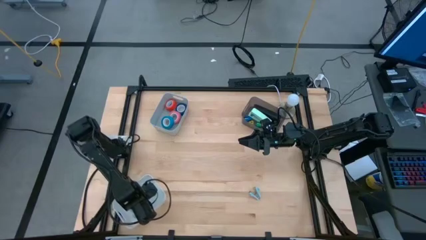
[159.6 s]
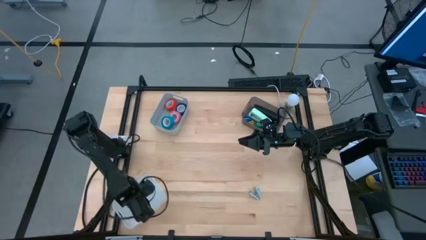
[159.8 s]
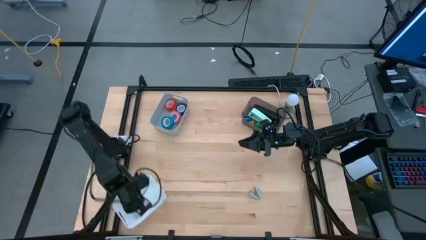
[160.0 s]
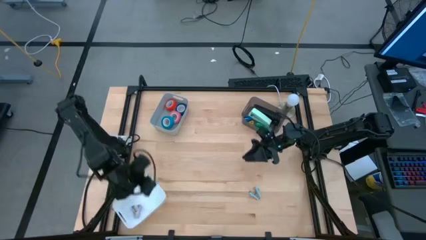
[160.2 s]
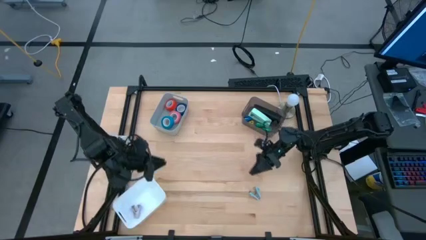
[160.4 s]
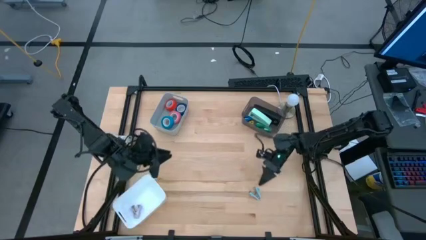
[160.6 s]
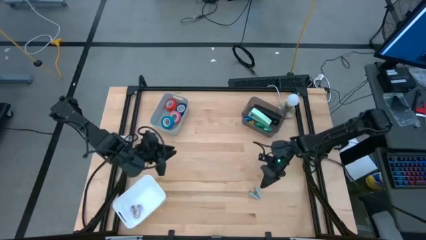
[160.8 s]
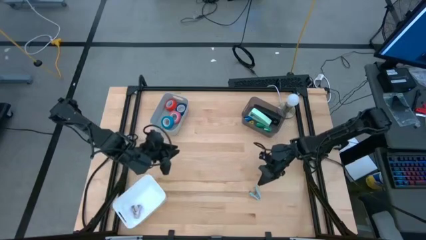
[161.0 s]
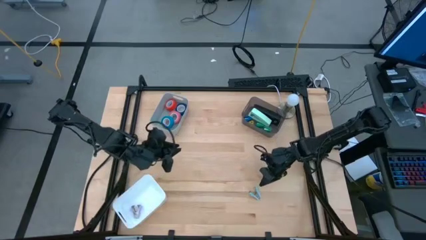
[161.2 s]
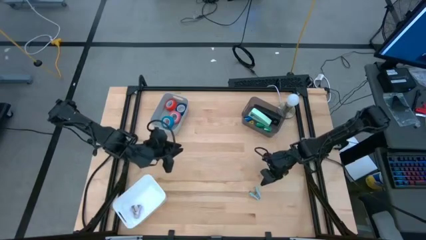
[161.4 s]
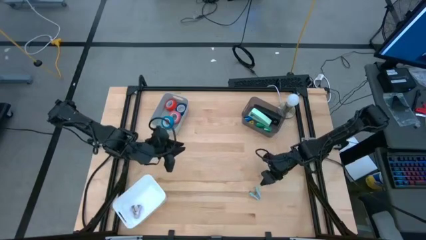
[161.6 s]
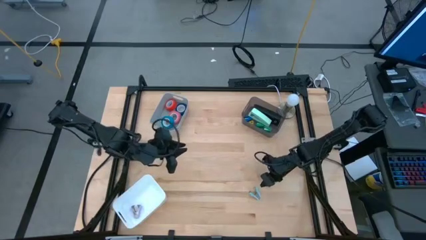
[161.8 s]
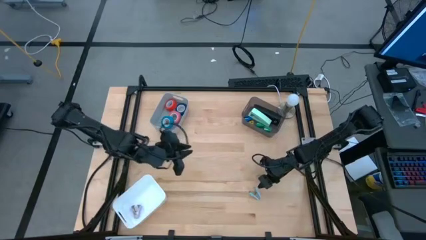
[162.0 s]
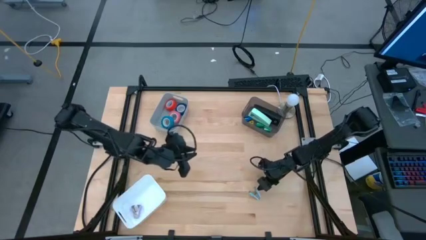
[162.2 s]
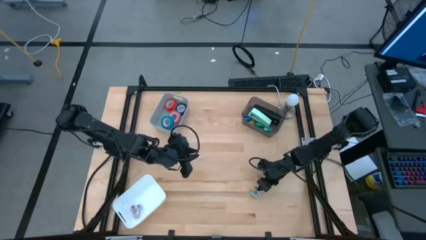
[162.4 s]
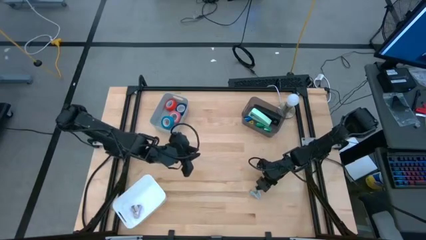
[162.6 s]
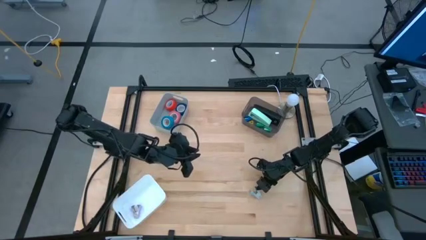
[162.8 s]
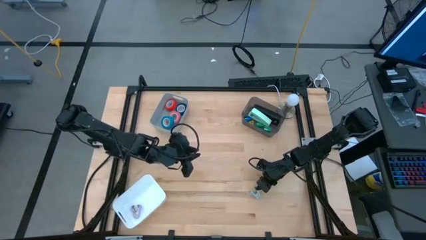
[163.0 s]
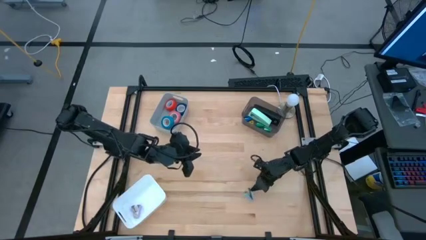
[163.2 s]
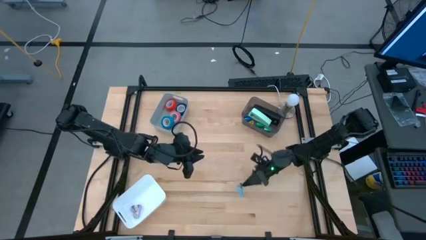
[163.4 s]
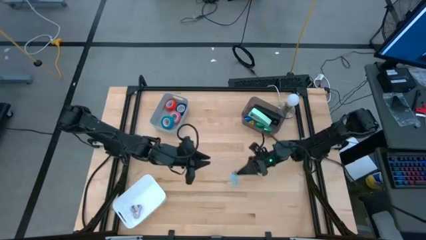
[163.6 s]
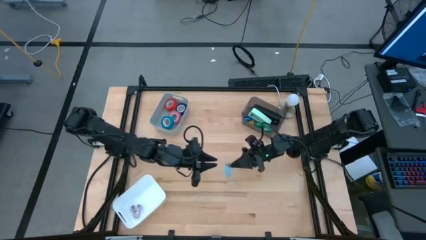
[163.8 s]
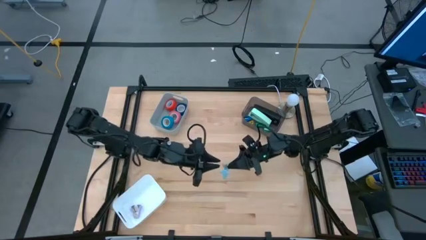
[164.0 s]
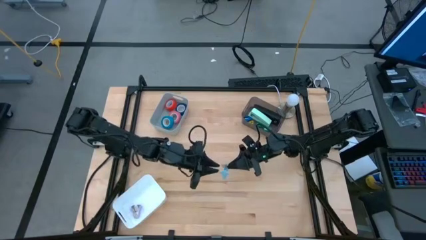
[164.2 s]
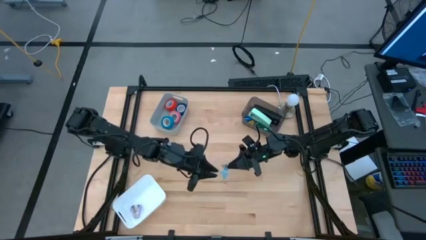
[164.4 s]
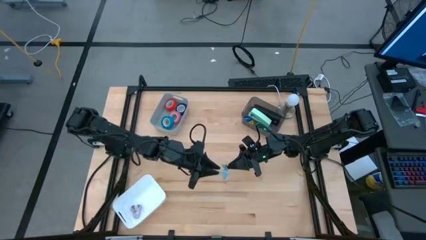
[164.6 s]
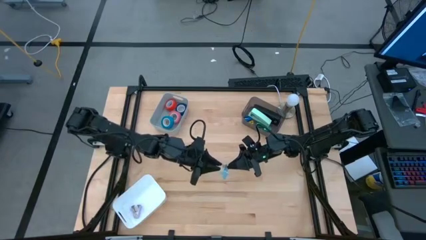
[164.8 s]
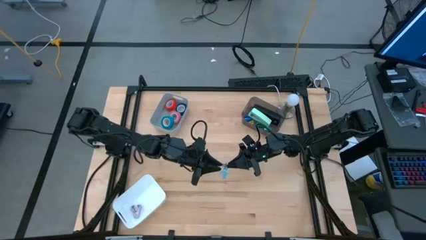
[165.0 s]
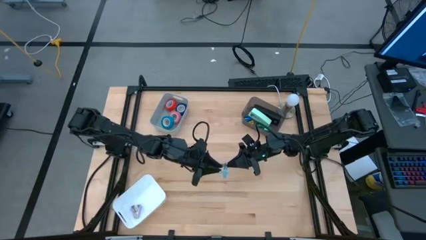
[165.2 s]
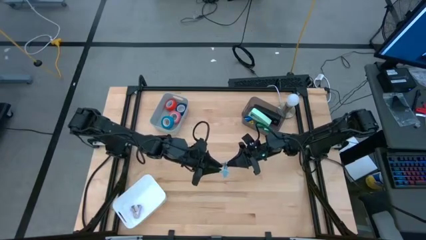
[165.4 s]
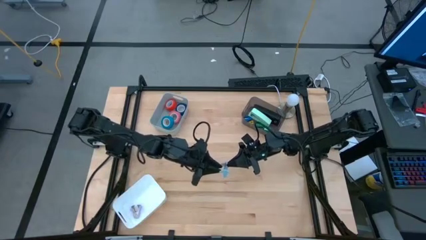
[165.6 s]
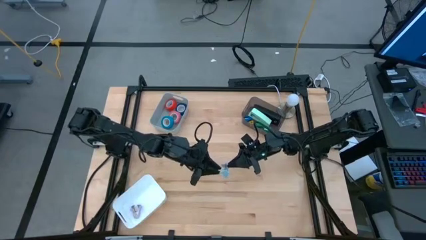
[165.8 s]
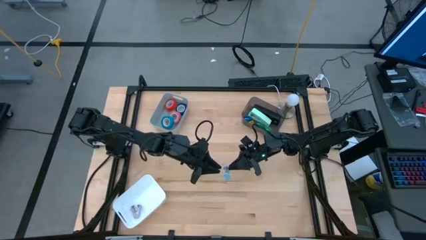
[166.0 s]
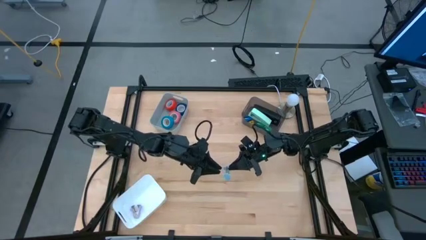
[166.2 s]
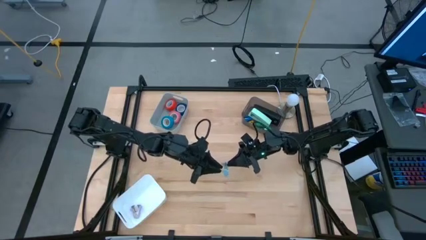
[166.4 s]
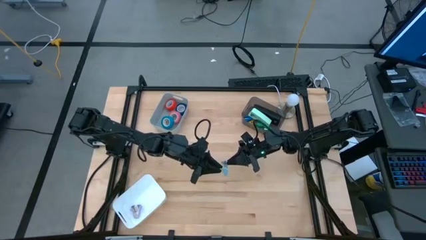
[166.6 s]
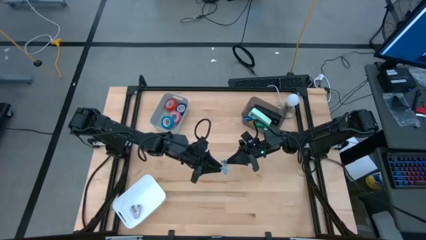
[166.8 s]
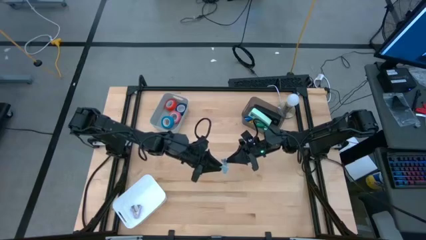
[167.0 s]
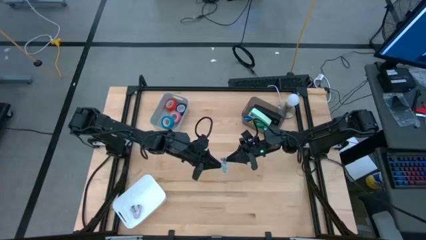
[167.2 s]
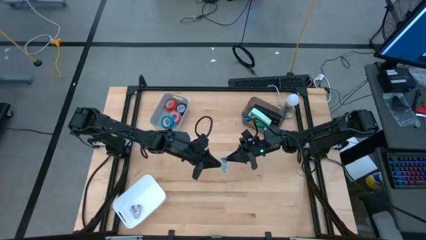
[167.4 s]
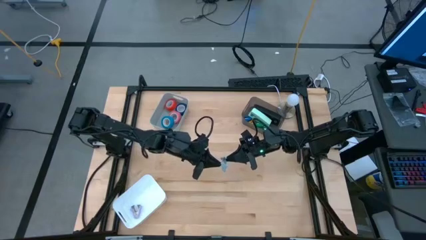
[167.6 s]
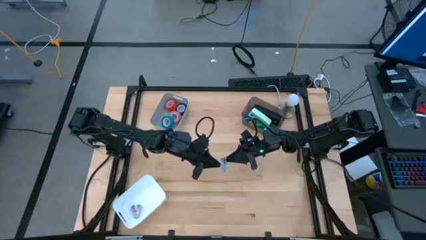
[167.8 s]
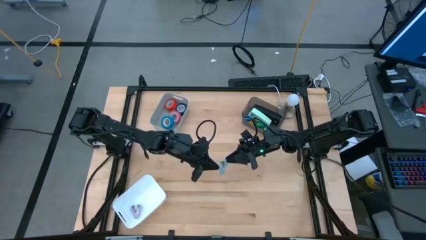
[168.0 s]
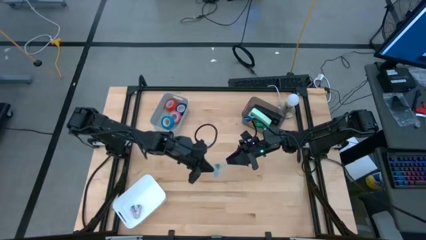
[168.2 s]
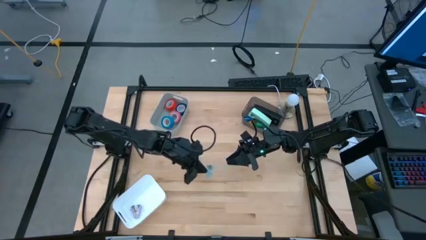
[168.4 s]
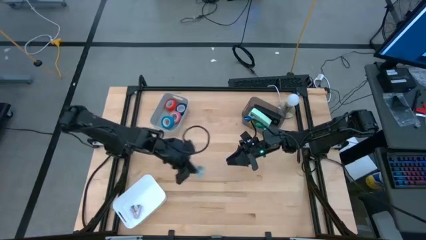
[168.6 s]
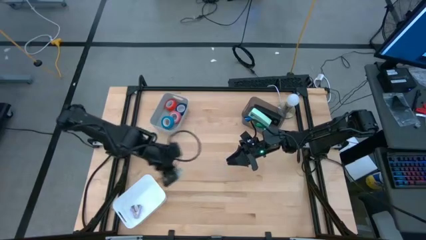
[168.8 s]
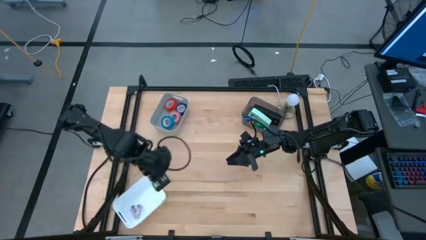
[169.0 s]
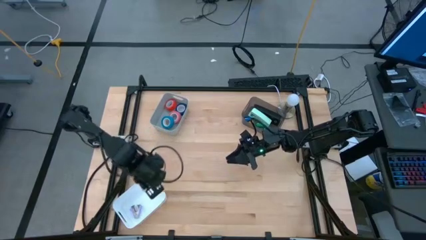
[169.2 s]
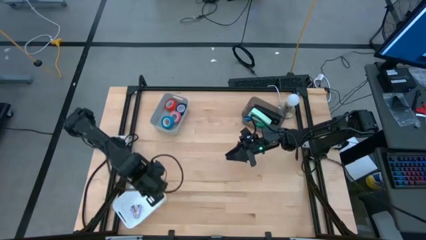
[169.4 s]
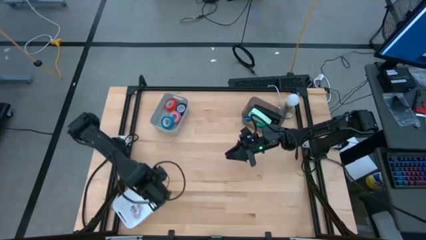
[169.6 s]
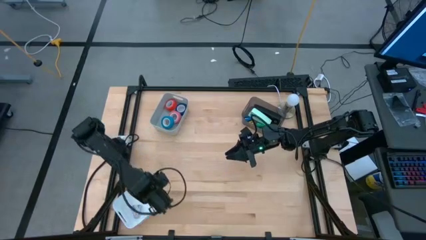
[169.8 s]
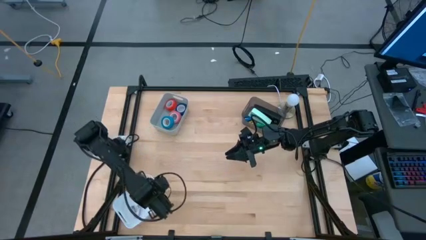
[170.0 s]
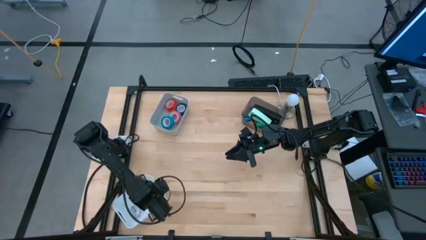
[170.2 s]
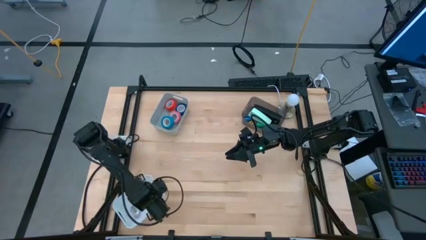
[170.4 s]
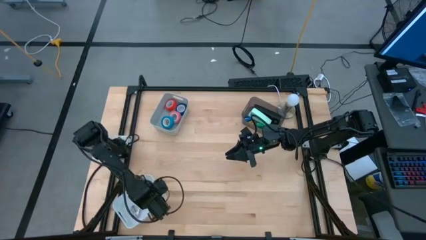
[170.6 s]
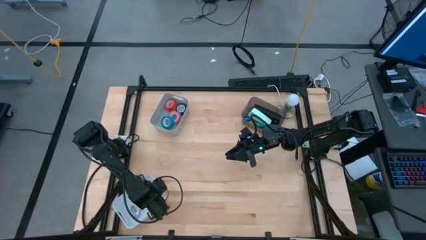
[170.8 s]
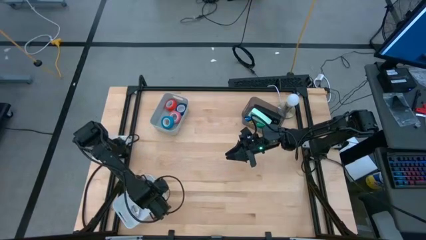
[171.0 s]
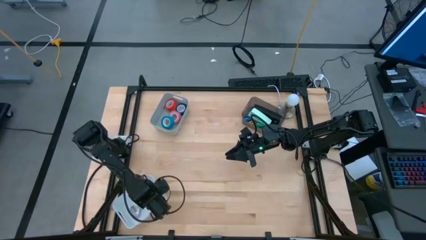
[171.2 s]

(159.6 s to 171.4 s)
Task: Pick and place Stapler, Stapler remover, tape
Put the gray staple remover into the white bin

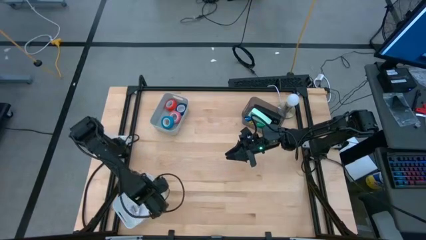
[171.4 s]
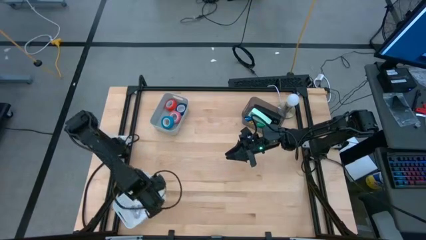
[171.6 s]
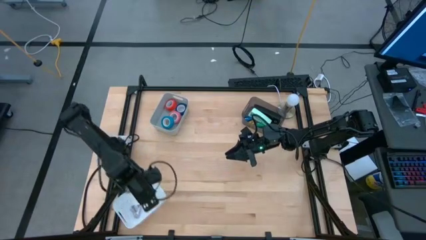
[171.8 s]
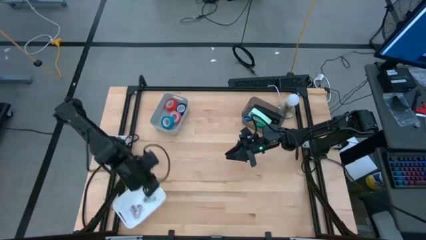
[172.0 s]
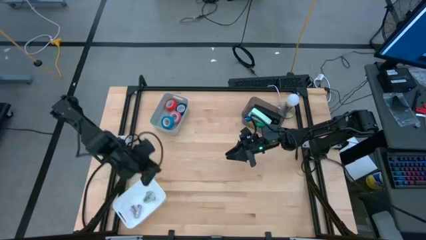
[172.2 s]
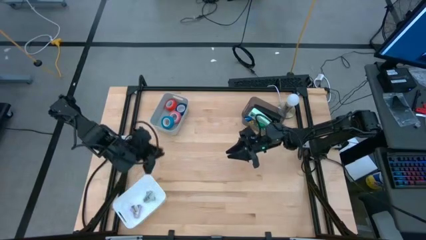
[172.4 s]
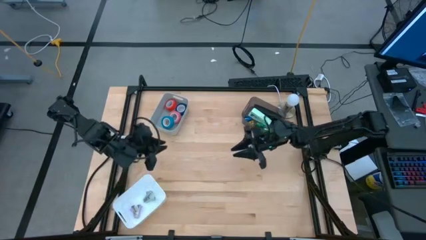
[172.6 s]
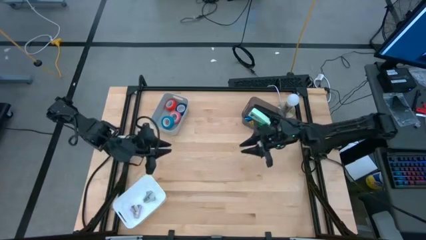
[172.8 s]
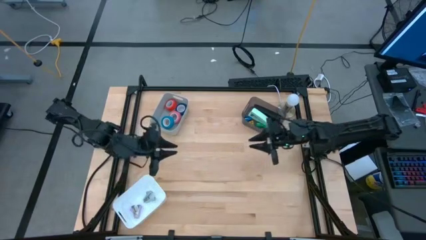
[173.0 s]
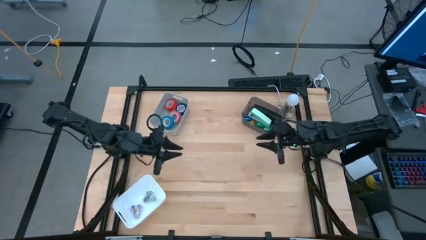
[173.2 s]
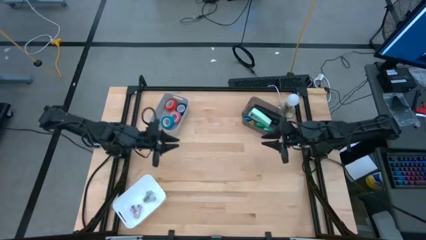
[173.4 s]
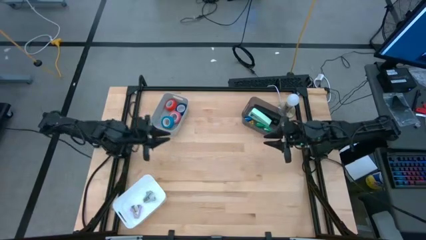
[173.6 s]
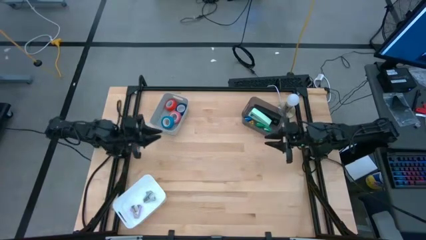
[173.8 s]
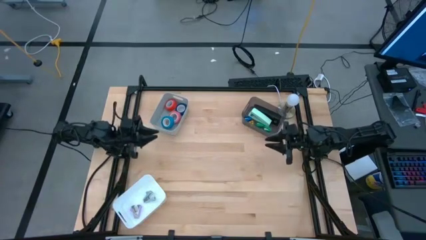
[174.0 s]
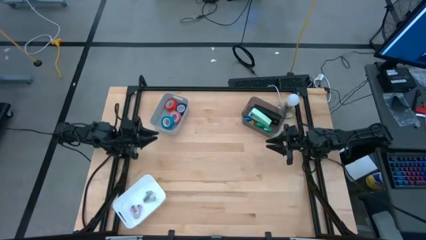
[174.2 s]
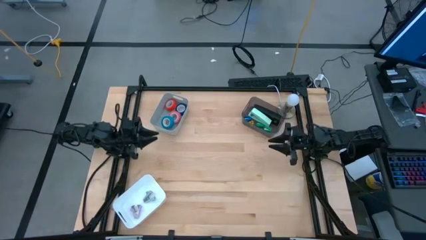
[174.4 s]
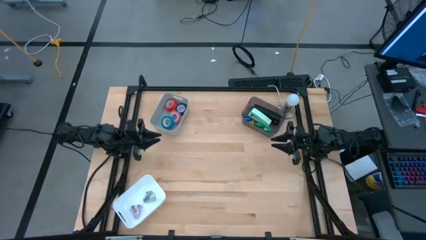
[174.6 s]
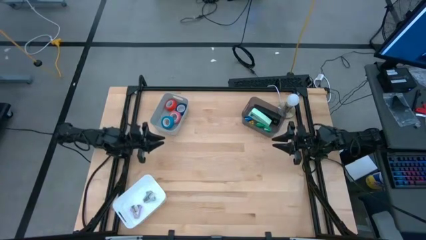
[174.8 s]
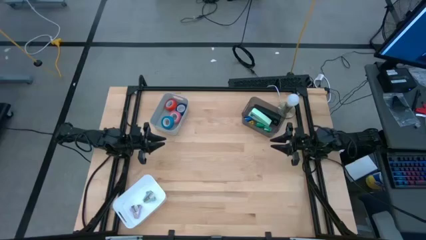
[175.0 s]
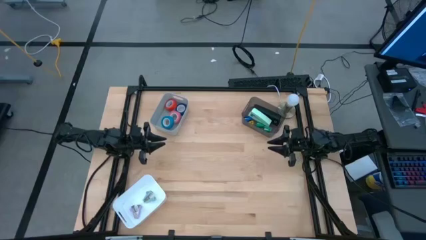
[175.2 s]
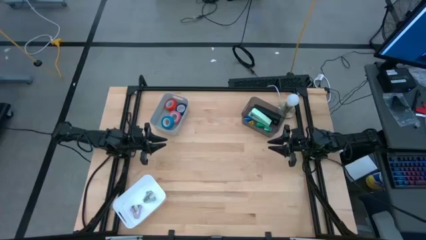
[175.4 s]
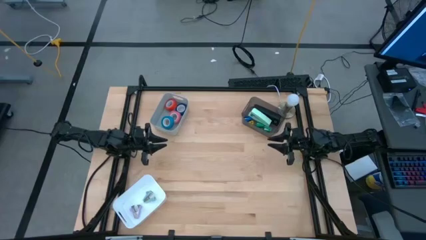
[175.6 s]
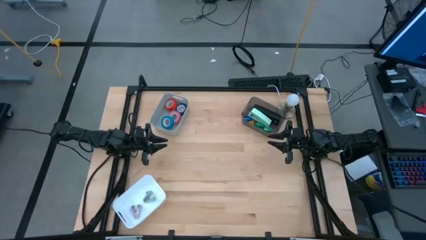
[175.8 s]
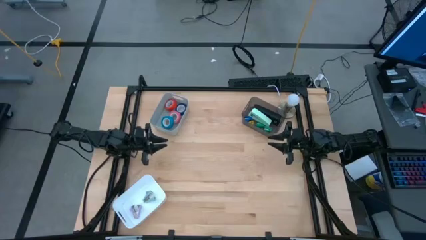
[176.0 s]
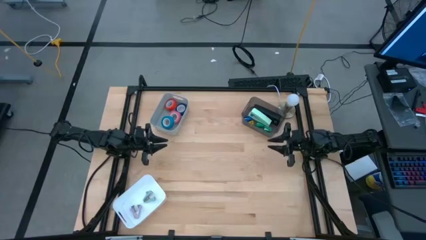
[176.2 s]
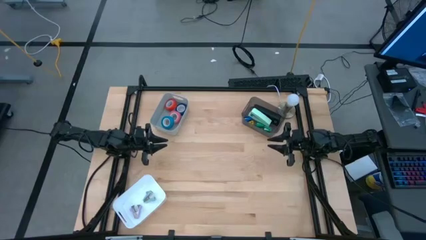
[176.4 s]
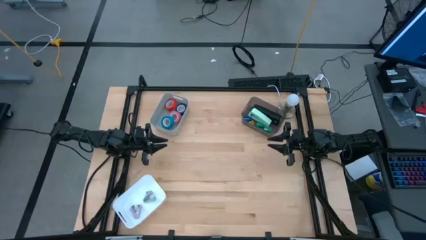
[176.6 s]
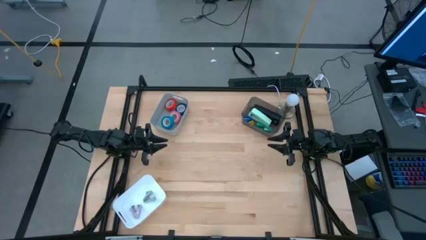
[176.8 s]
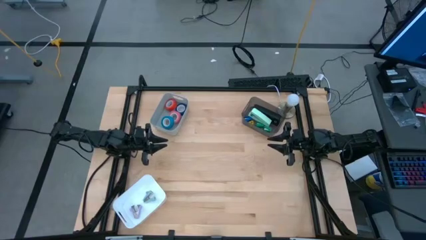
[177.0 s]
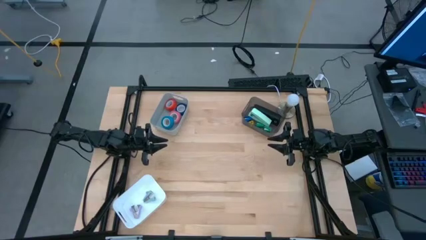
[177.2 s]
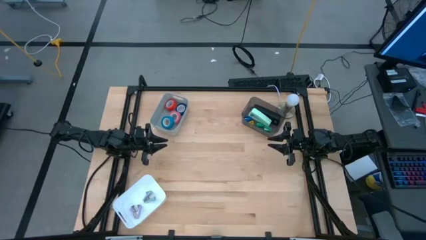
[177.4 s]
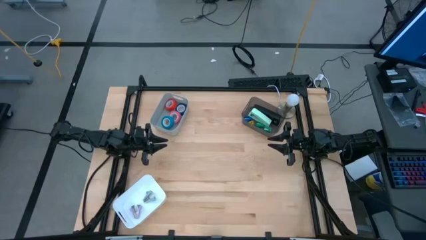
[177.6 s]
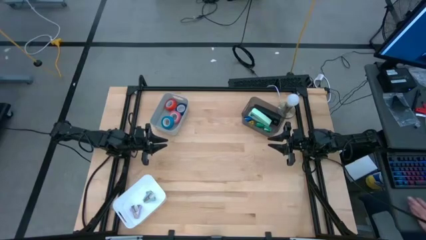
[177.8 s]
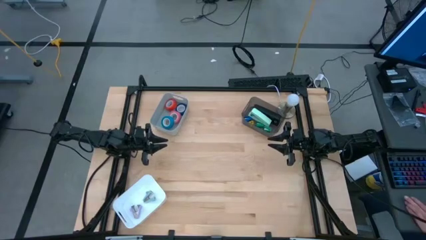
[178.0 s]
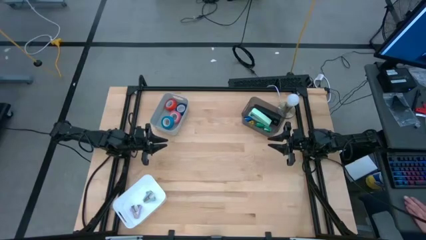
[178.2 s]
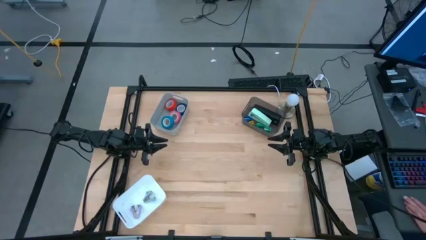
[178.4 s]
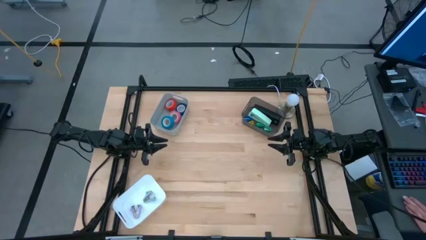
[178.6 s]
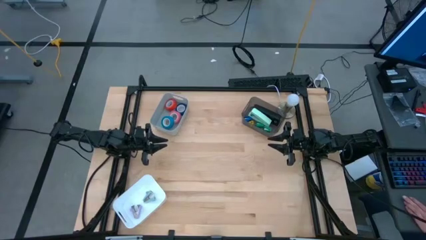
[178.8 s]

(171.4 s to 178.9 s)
Return to Home Position
